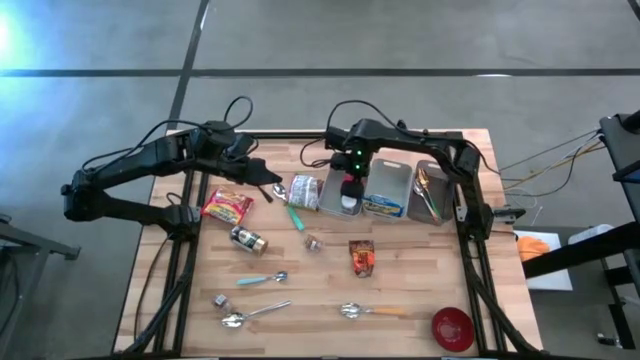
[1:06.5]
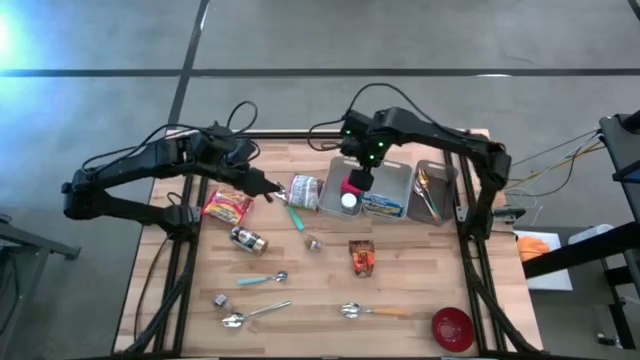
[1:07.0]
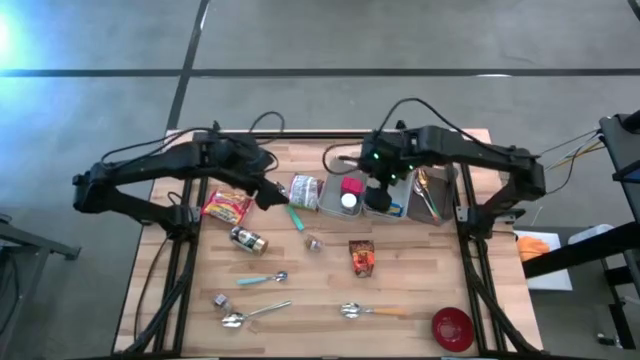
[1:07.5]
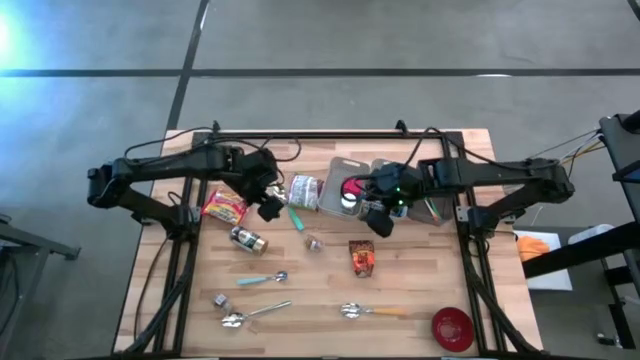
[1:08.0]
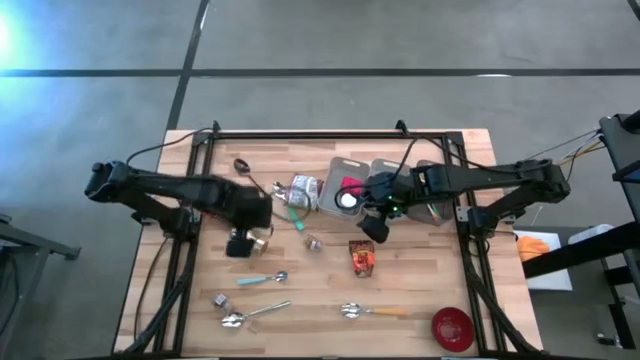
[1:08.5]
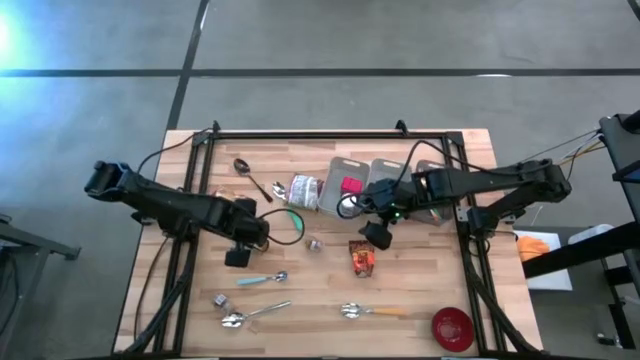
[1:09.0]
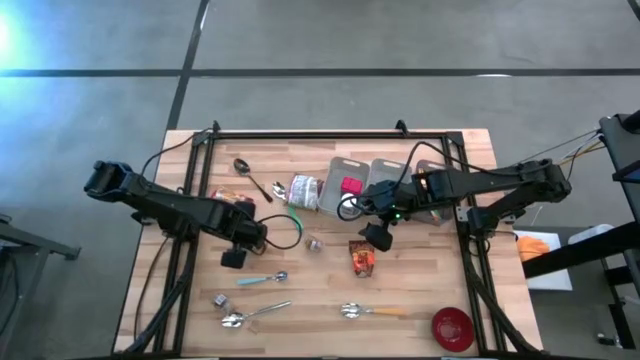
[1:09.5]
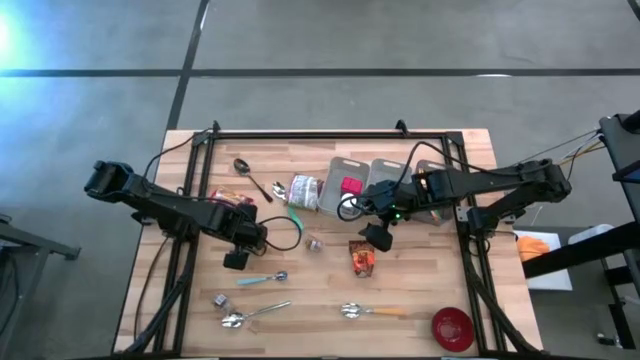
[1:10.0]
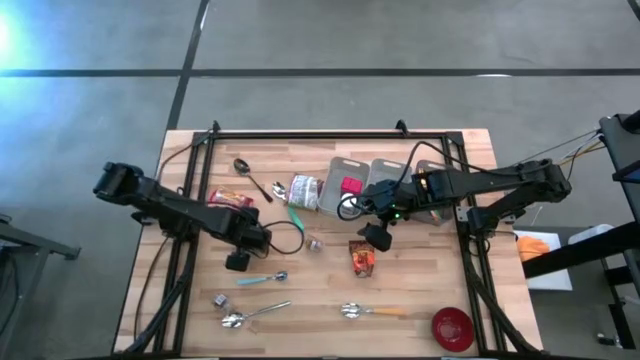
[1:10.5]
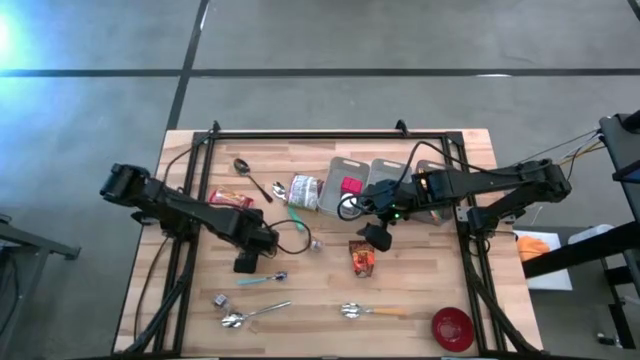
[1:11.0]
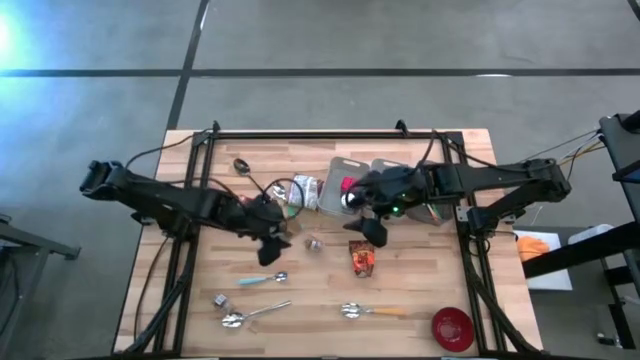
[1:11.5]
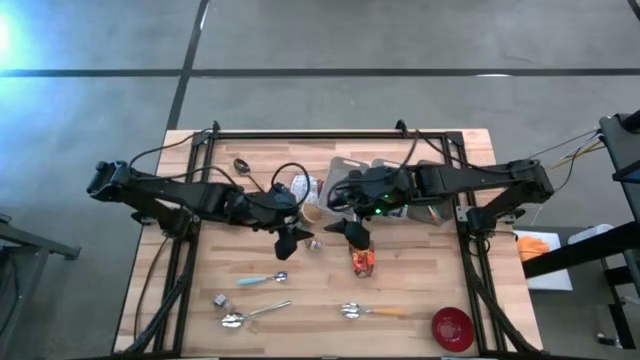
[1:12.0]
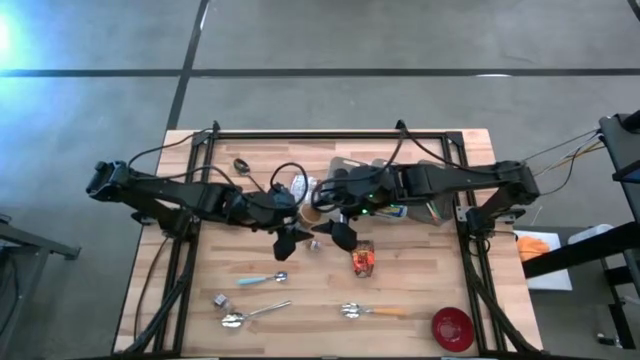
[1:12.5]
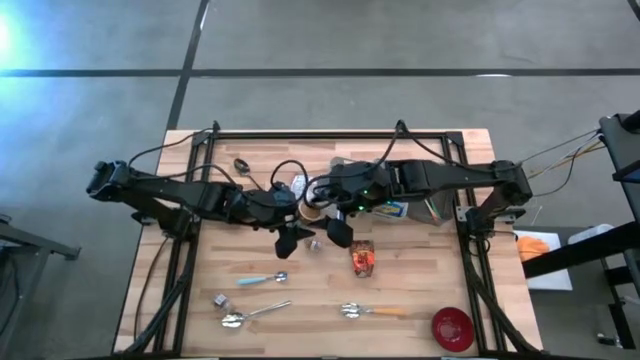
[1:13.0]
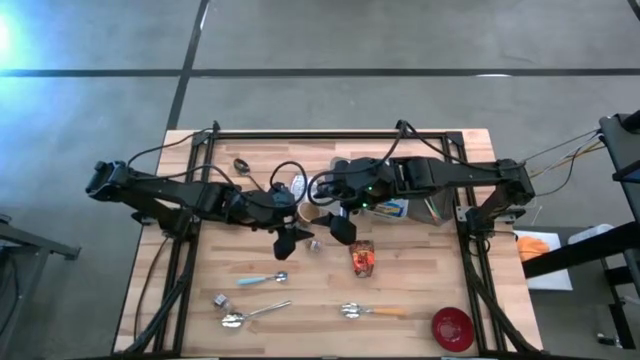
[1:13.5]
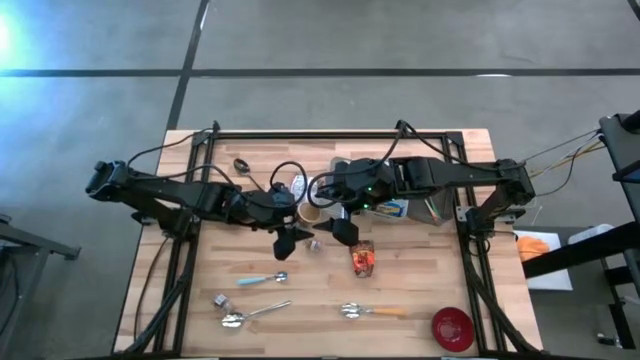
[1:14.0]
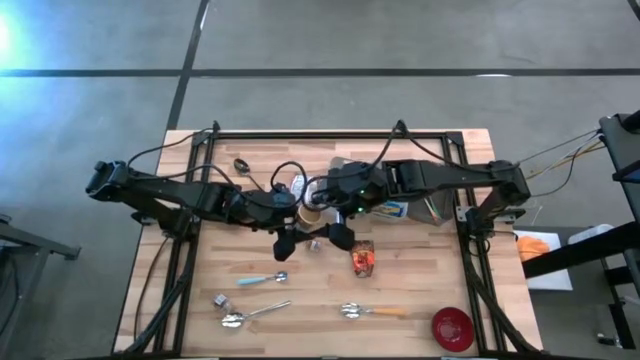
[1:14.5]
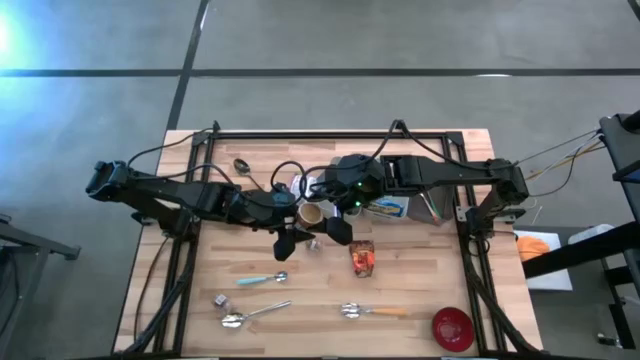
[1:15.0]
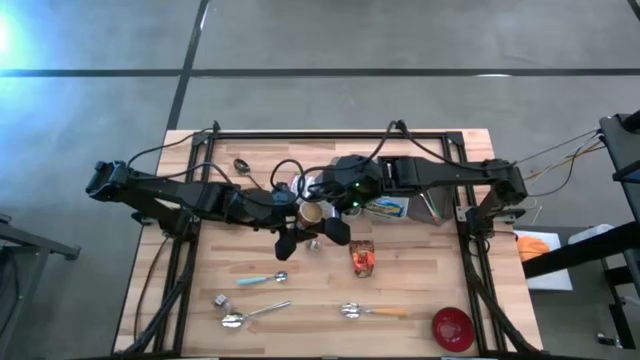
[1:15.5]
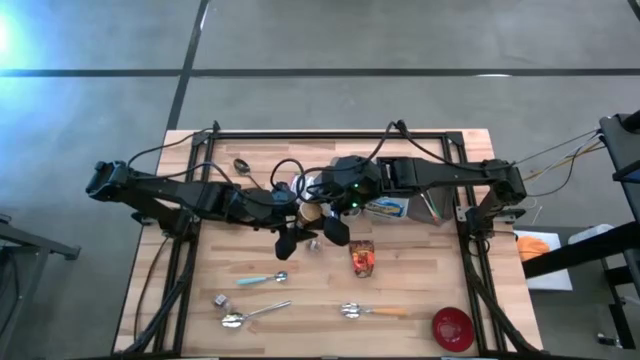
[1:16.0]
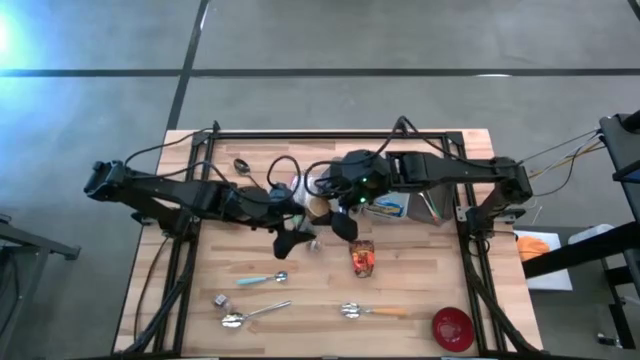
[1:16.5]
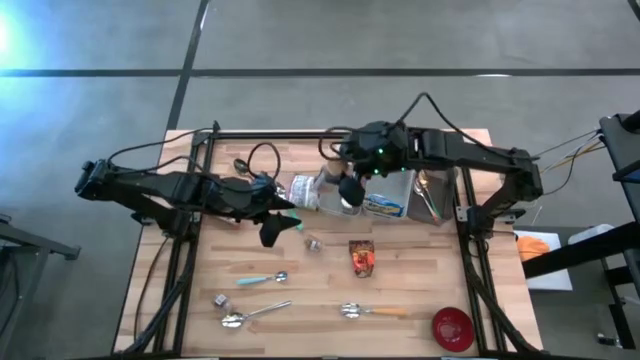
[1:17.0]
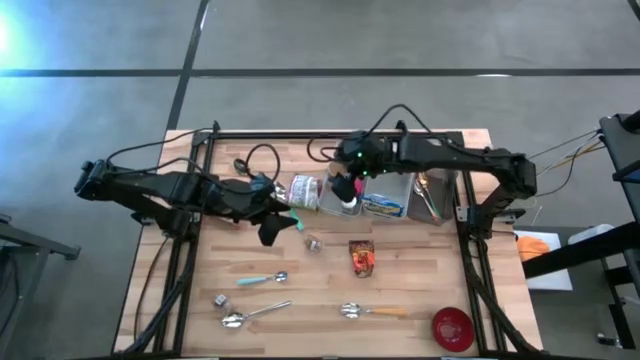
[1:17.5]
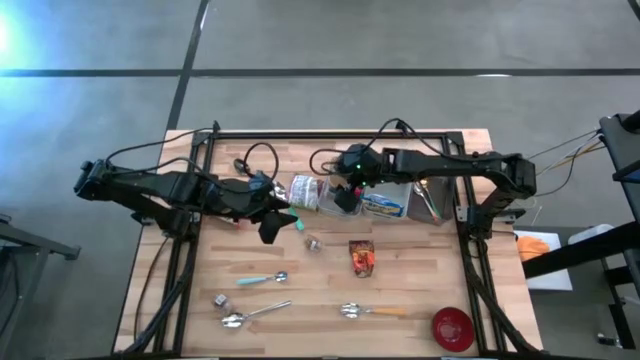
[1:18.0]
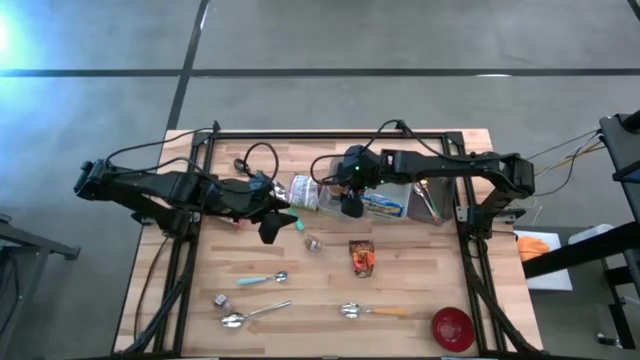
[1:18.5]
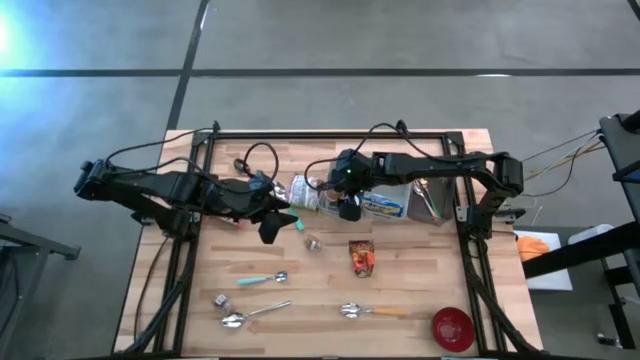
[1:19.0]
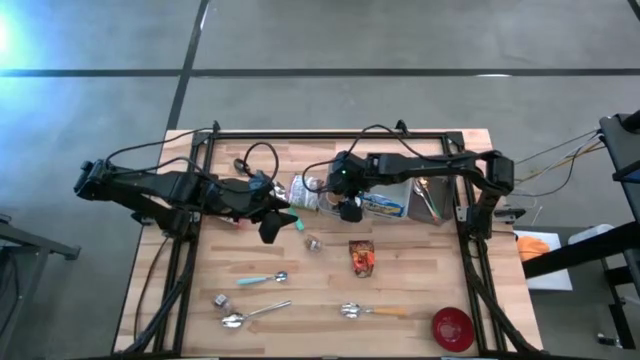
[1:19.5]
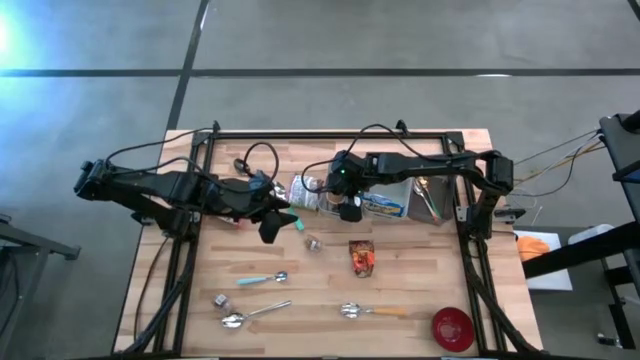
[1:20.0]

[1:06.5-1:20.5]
Put the gold seasoning bottle into the left gray bin
